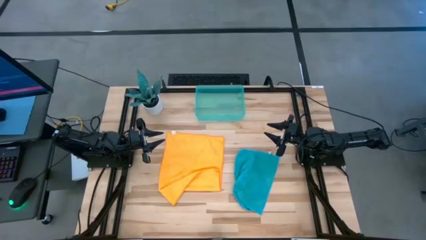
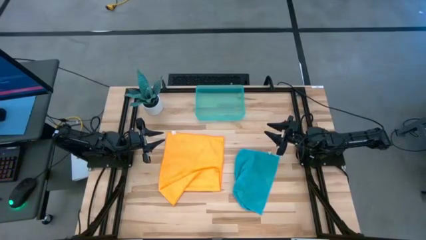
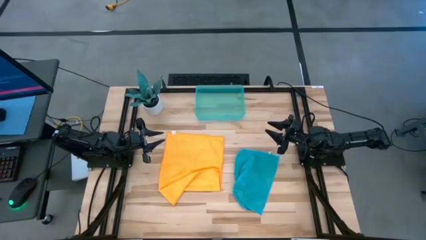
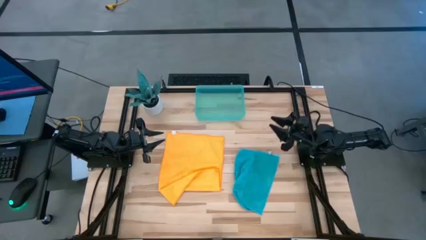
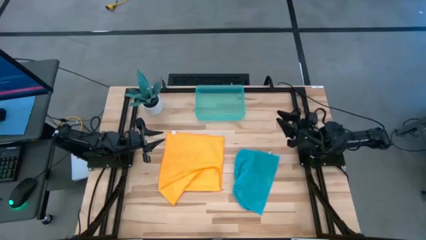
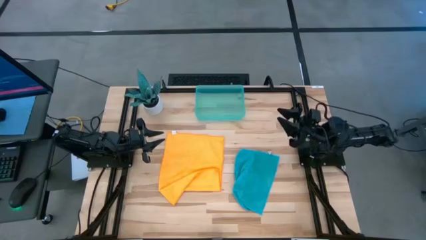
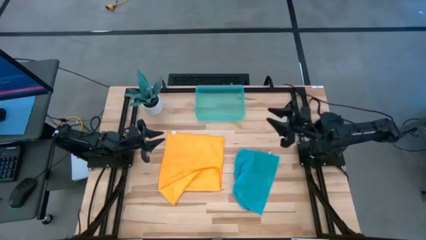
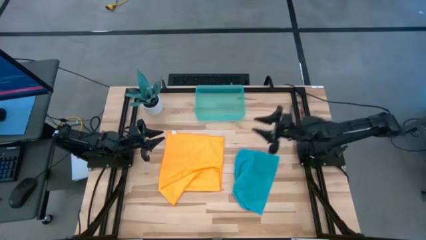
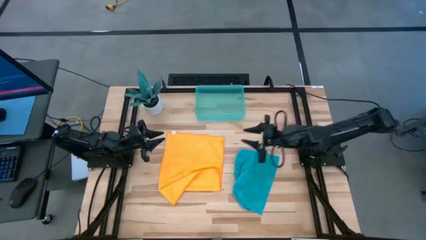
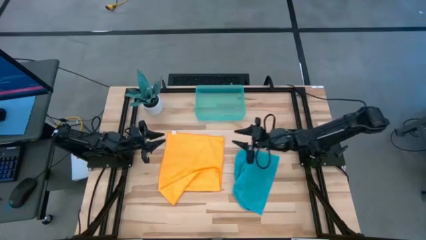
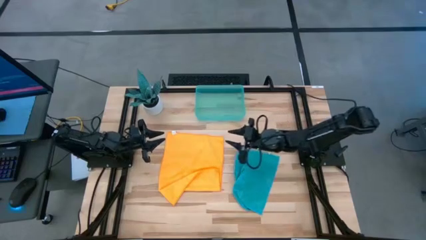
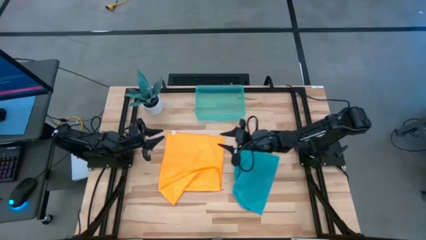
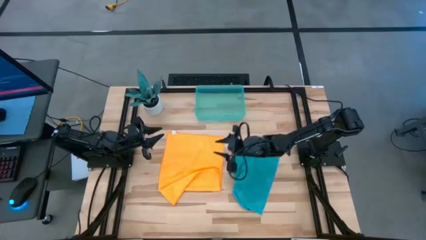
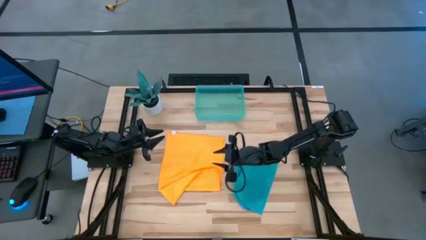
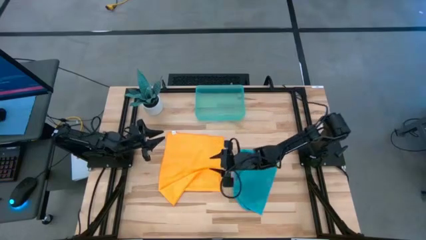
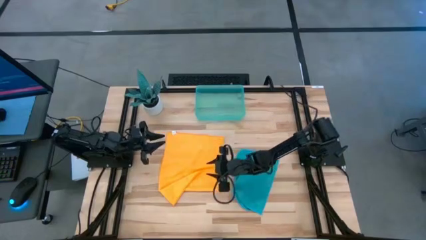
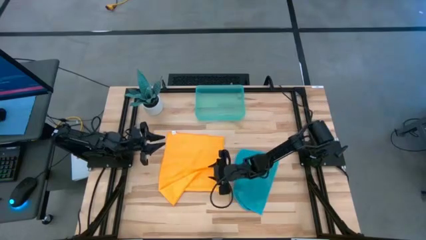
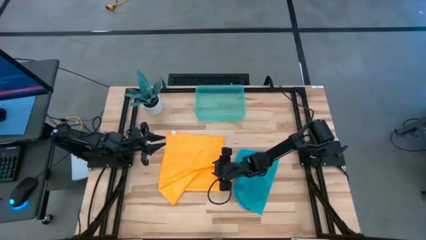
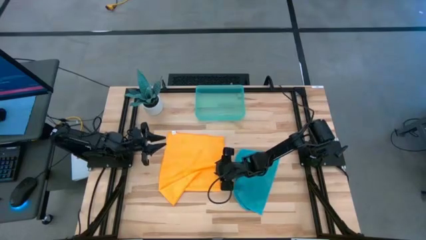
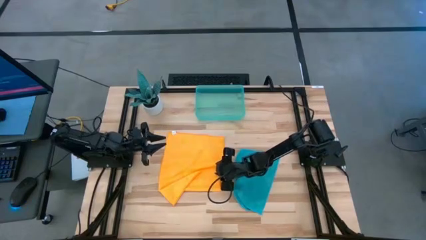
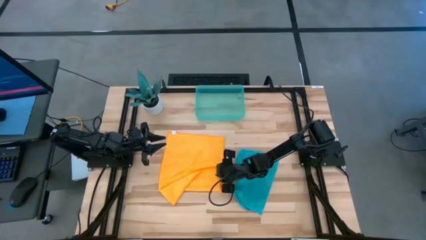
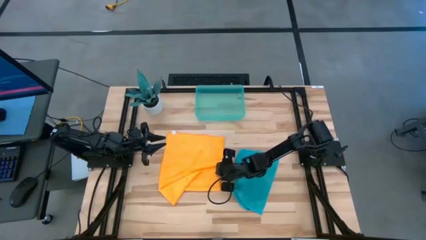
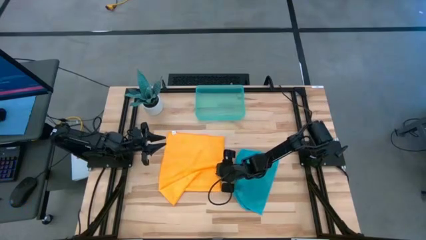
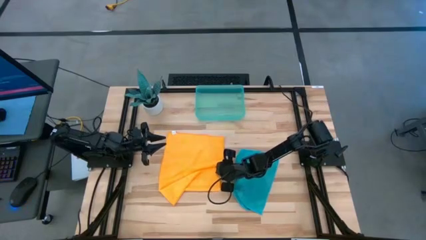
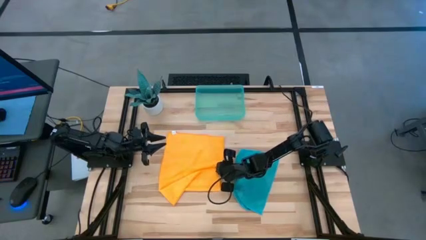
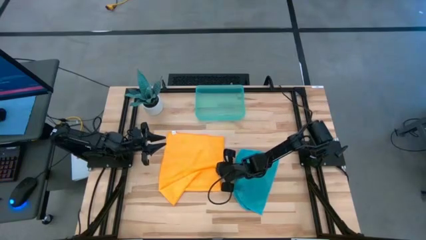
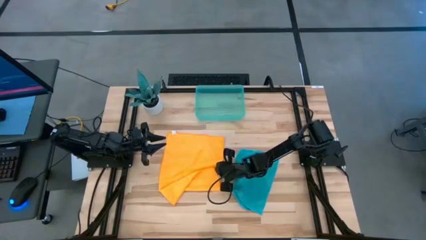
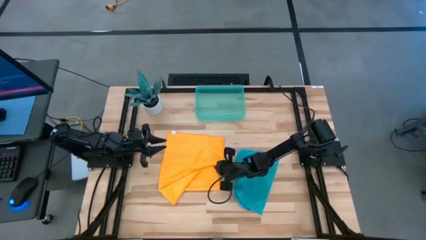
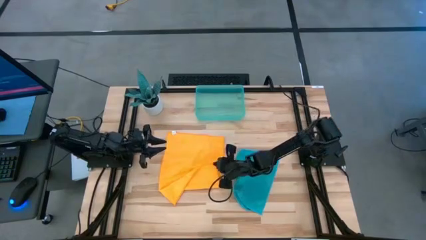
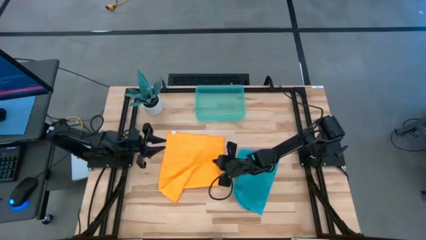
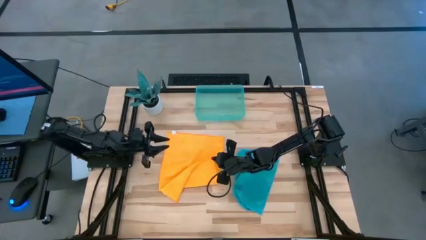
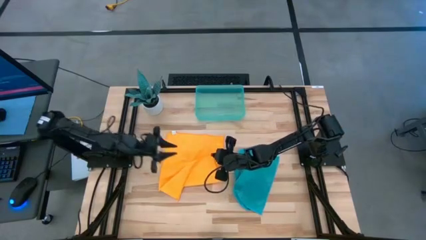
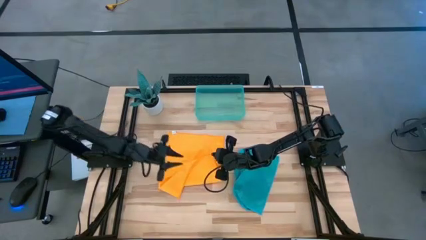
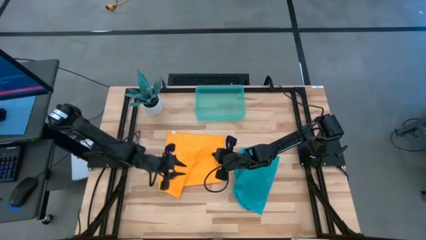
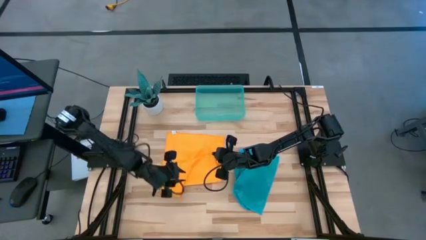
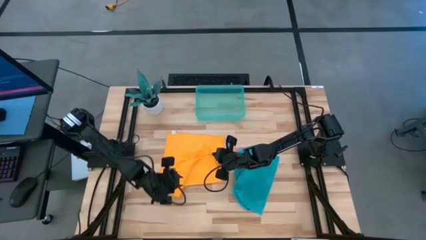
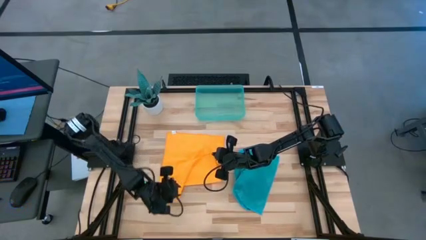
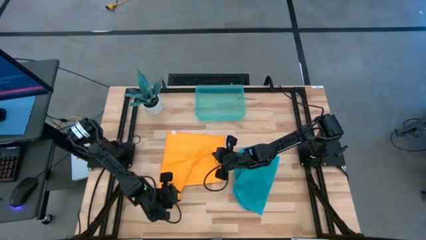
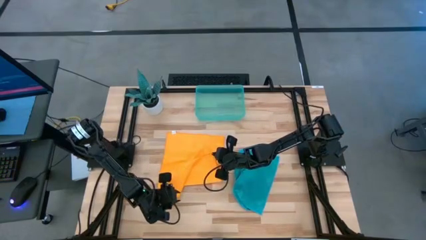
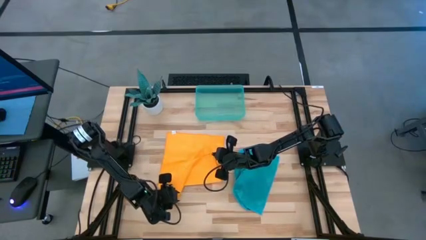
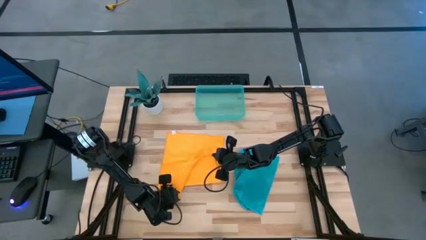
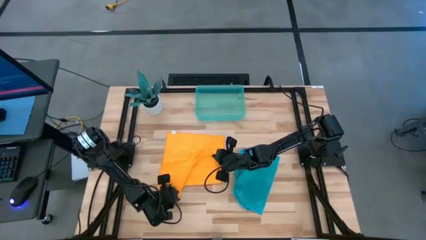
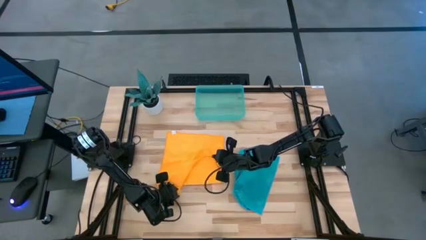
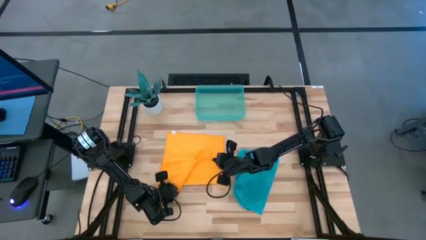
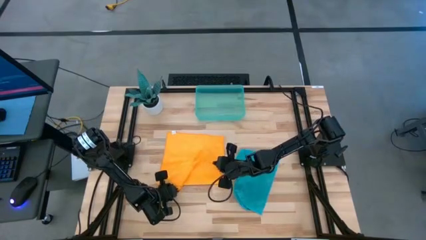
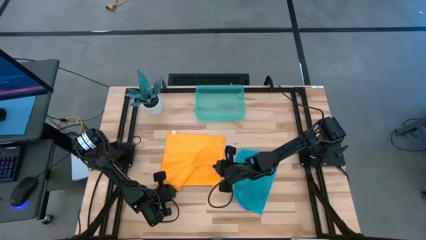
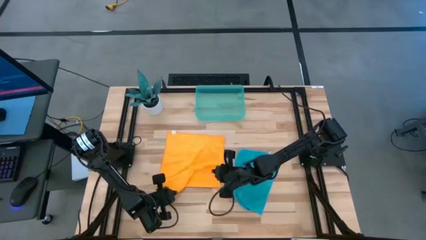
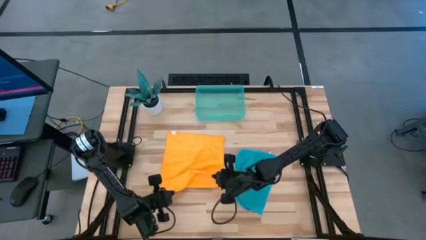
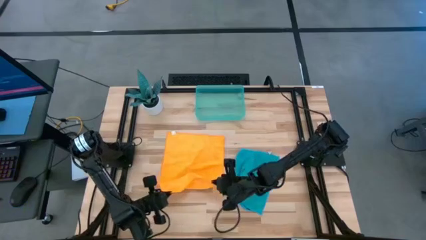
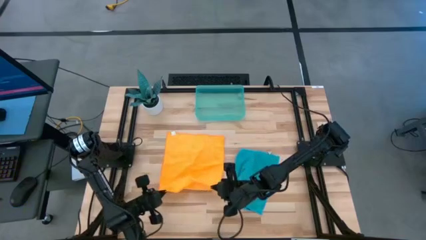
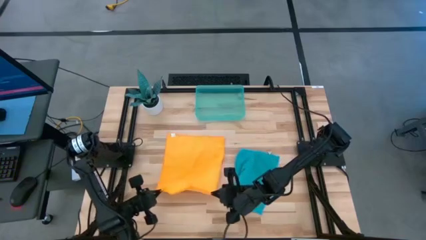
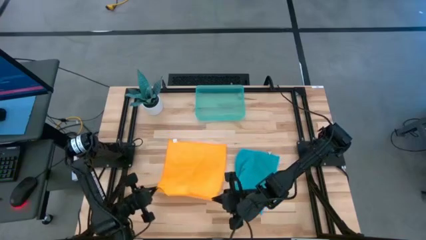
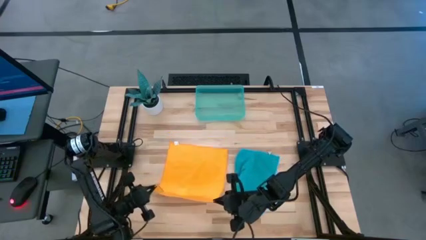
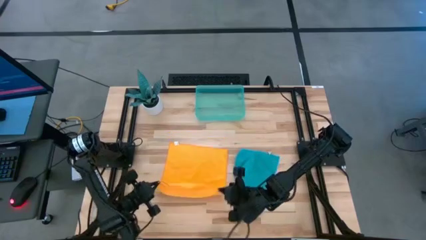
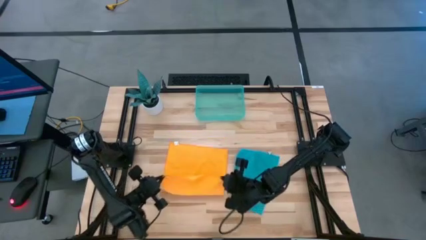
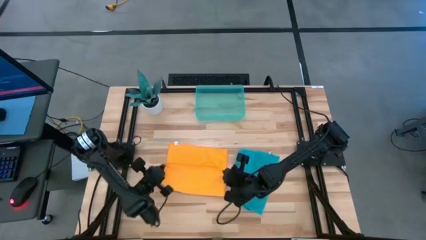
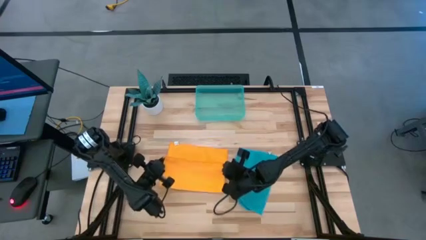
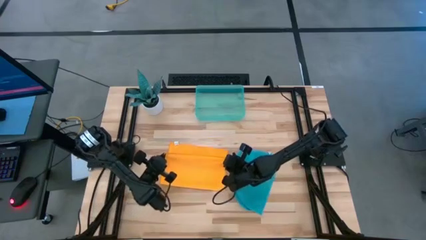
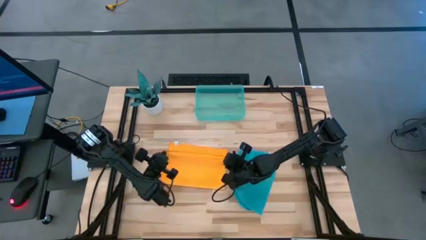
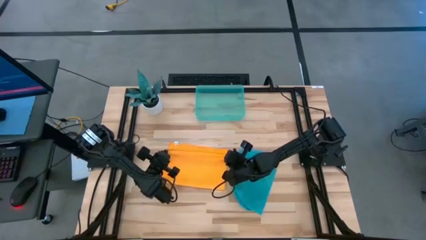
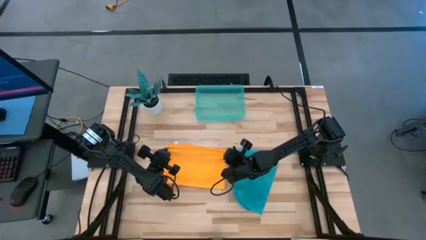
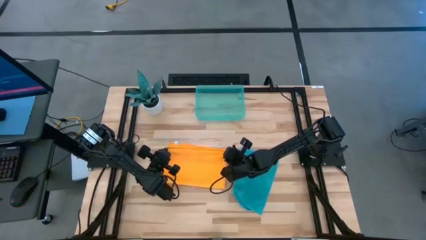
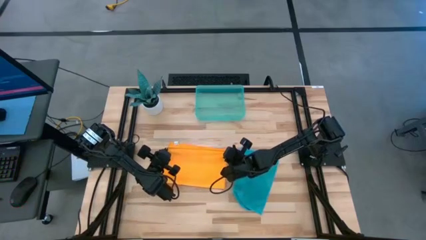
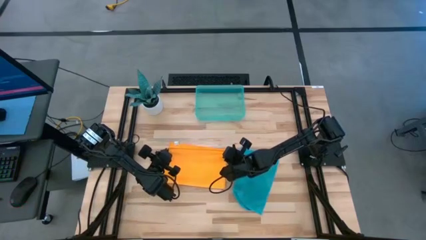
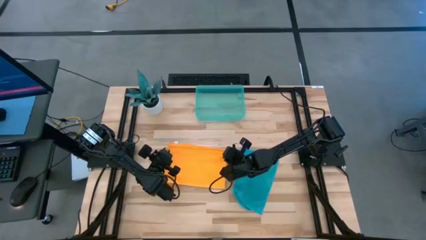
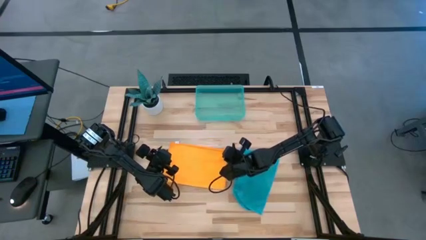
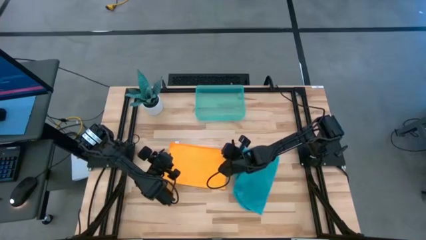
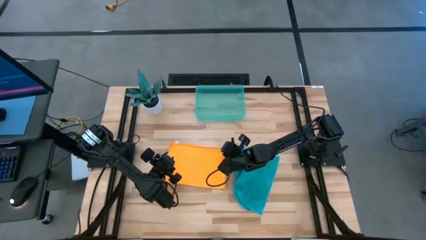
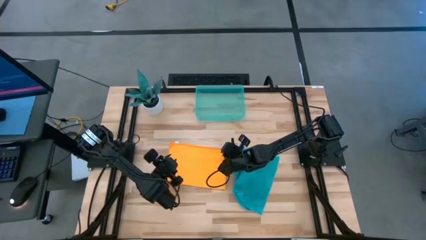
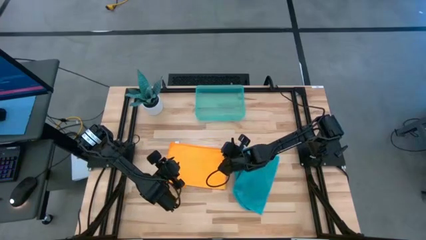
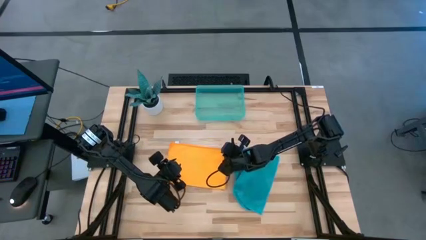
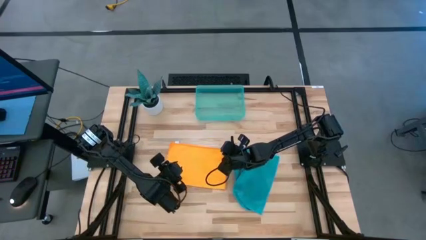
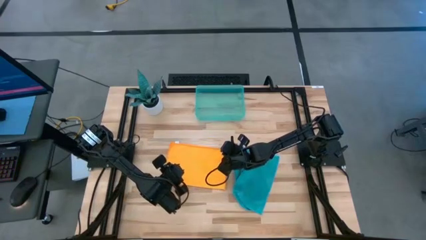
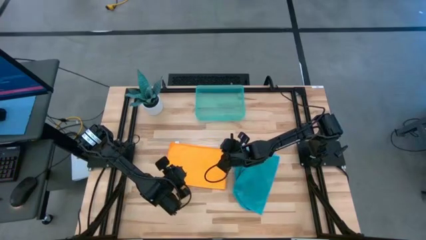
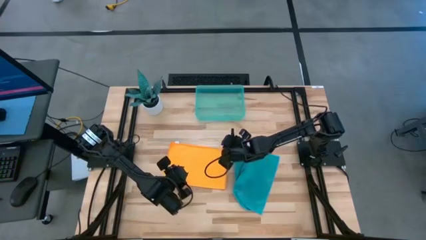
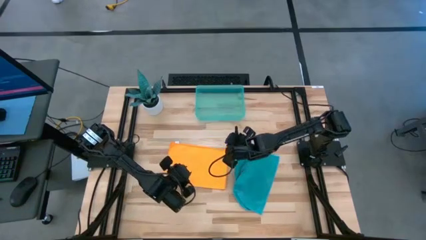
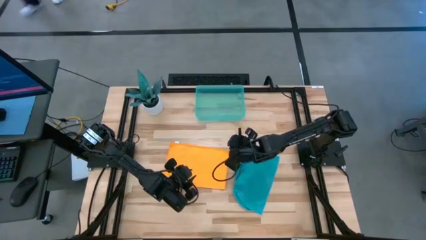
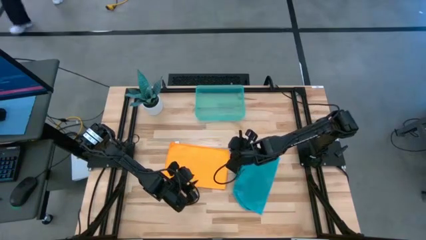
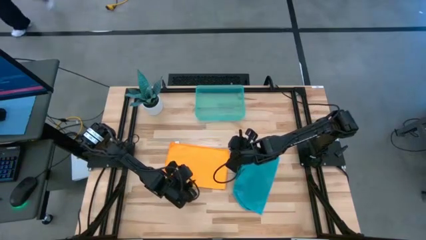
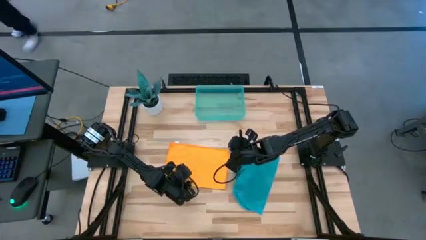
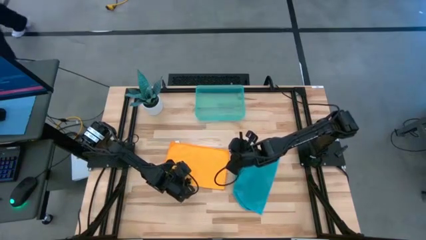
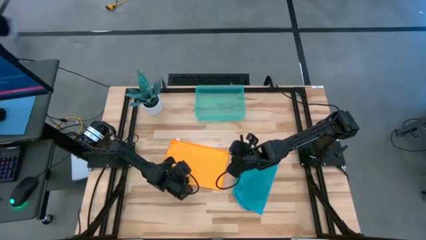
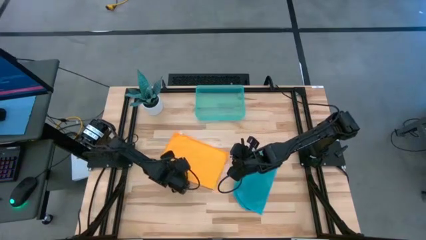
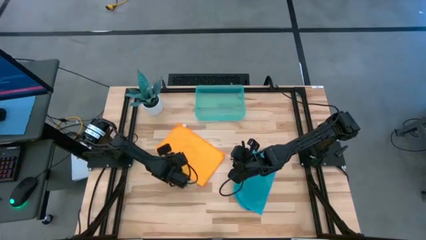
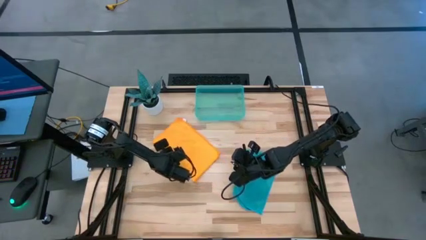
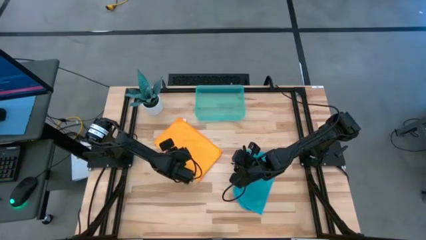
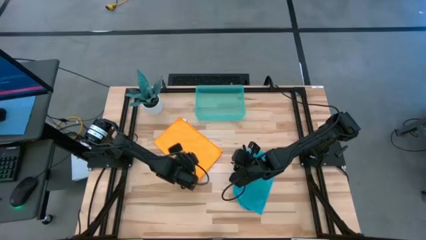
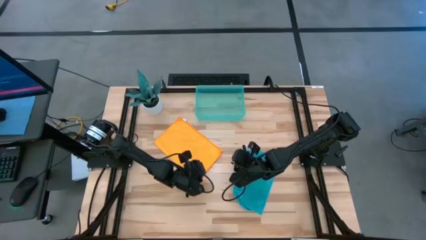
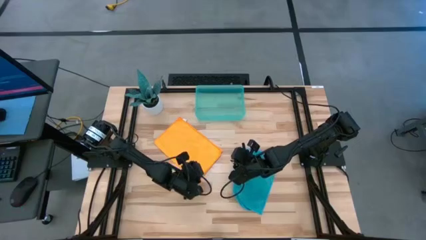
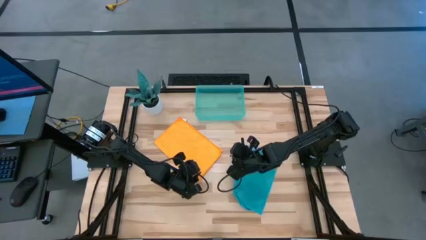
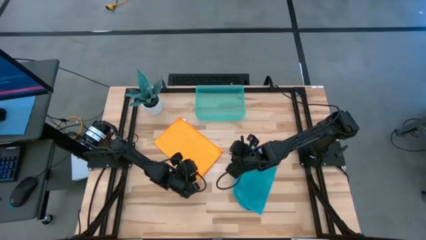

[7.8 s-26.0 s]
Task: Roll microfiber towels into tight, uniform cylinder then place into a basket
Roll the yellow microfiber cloth
